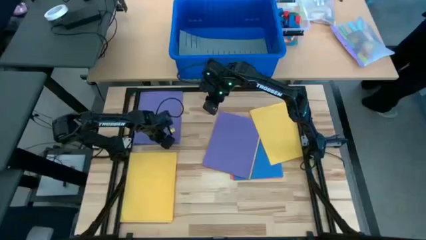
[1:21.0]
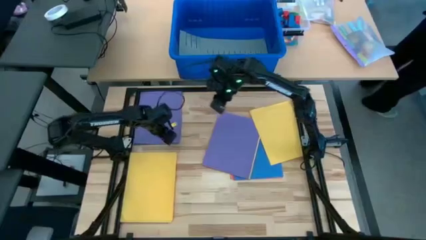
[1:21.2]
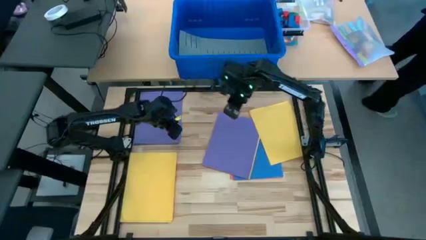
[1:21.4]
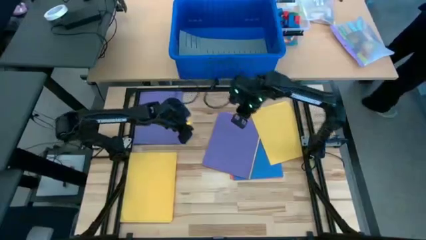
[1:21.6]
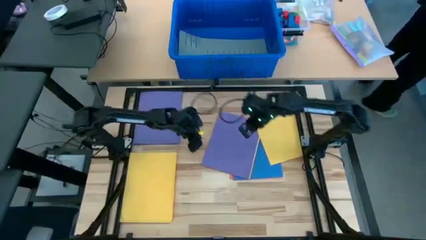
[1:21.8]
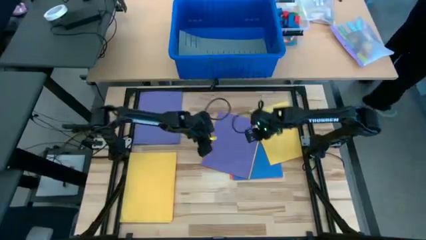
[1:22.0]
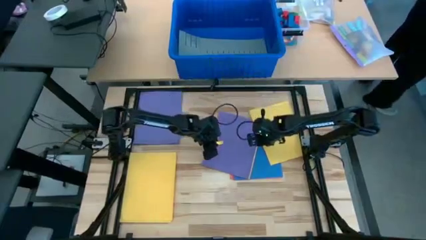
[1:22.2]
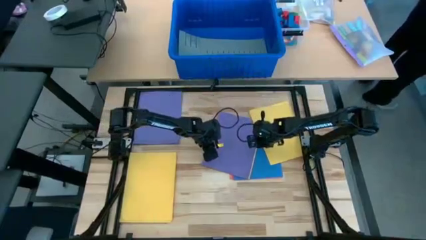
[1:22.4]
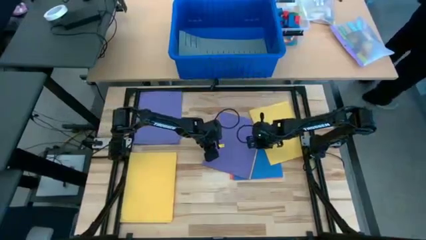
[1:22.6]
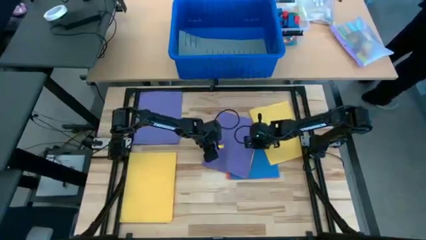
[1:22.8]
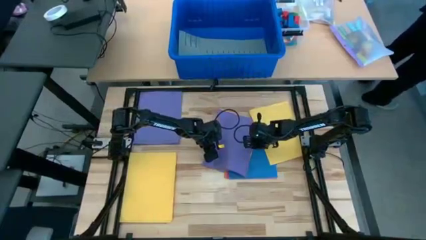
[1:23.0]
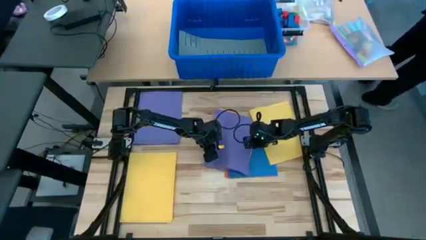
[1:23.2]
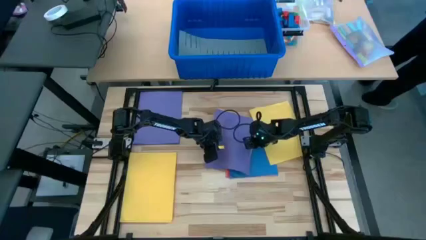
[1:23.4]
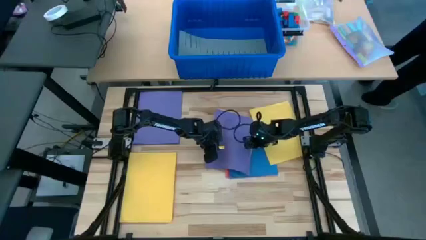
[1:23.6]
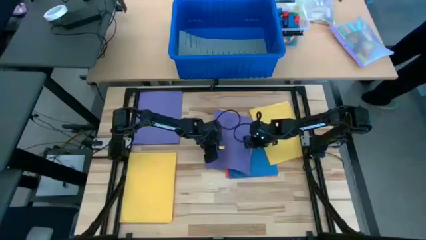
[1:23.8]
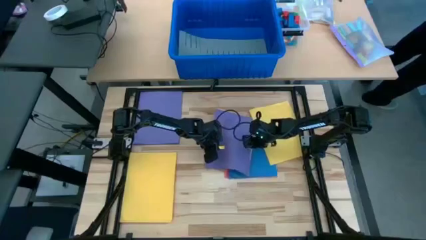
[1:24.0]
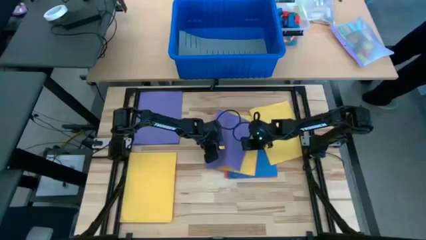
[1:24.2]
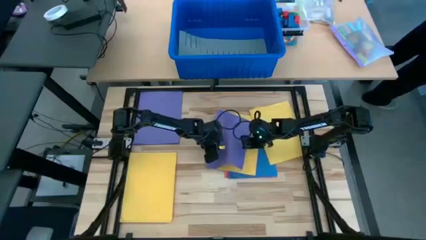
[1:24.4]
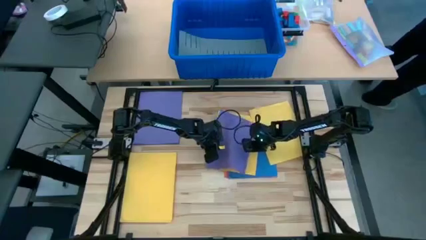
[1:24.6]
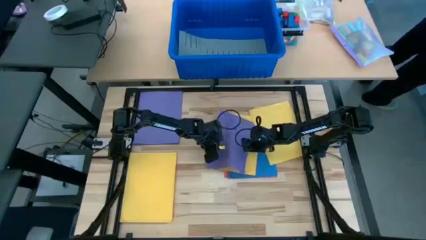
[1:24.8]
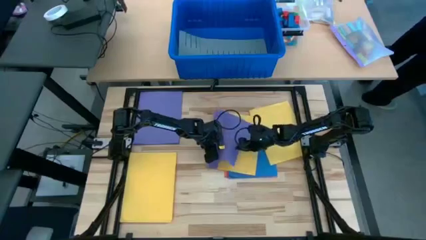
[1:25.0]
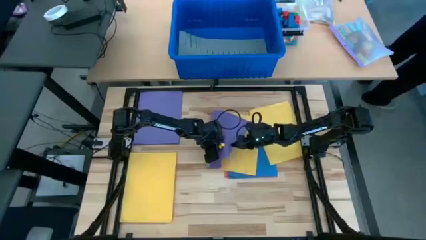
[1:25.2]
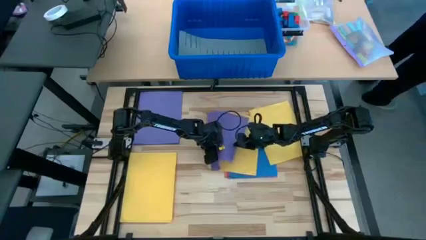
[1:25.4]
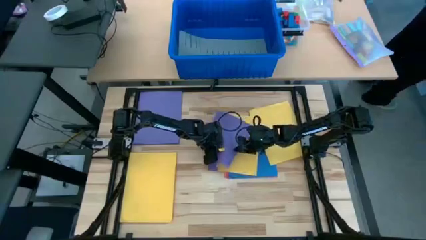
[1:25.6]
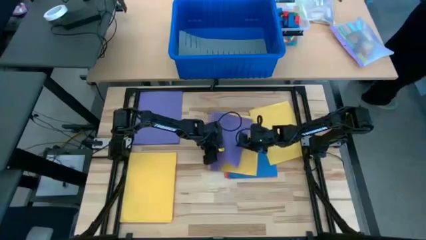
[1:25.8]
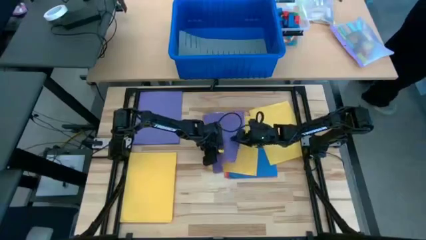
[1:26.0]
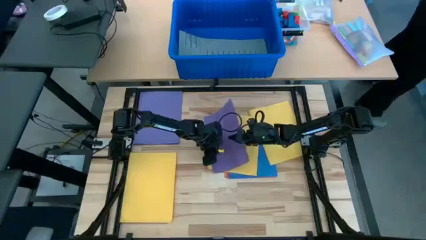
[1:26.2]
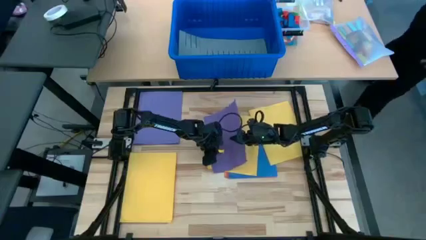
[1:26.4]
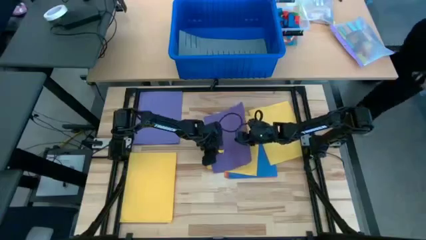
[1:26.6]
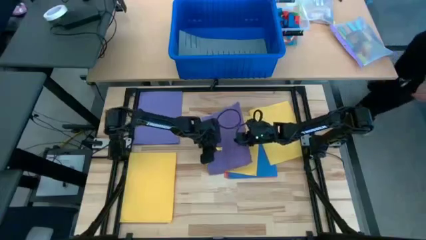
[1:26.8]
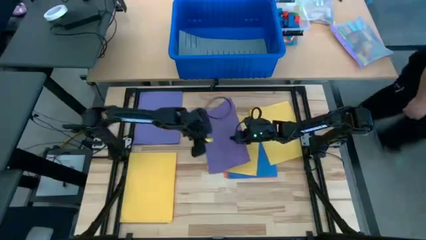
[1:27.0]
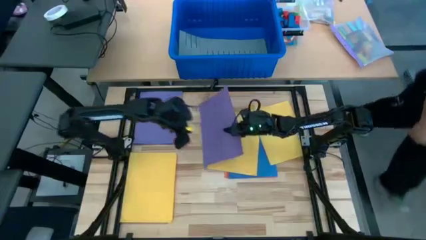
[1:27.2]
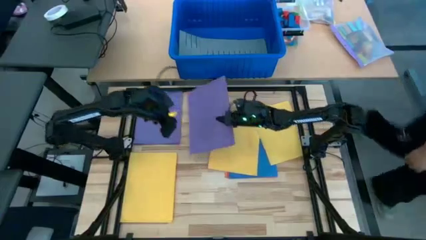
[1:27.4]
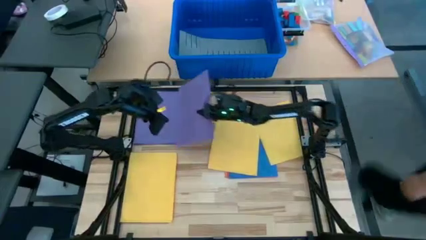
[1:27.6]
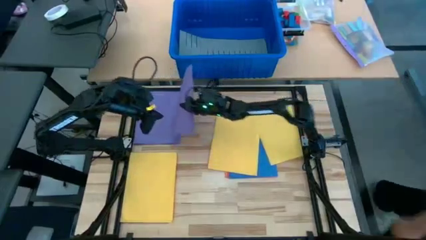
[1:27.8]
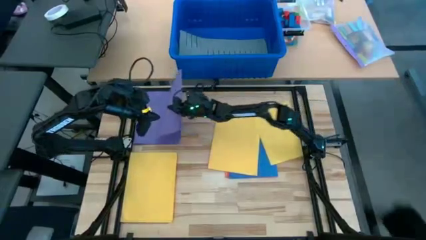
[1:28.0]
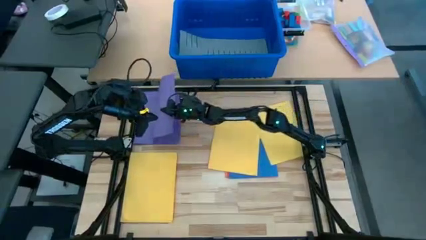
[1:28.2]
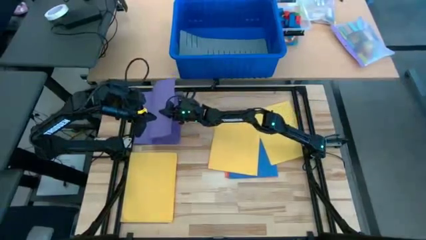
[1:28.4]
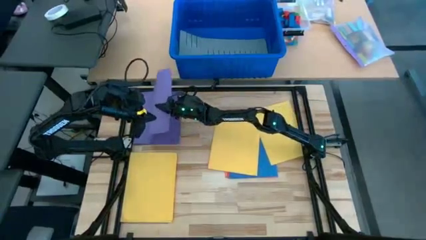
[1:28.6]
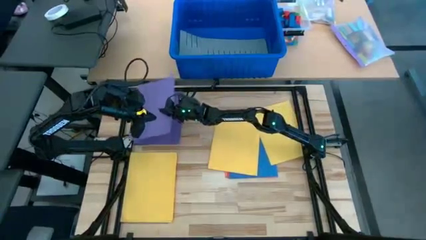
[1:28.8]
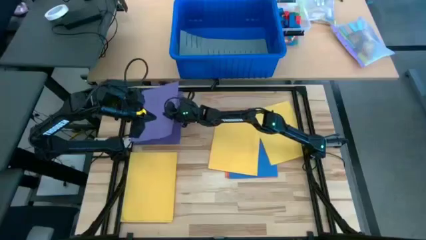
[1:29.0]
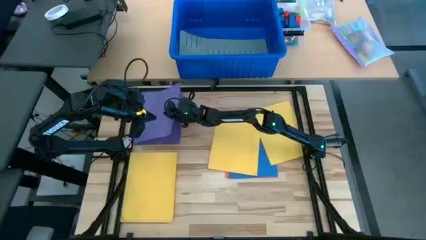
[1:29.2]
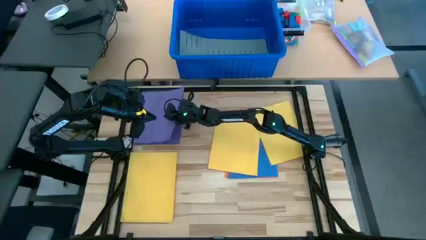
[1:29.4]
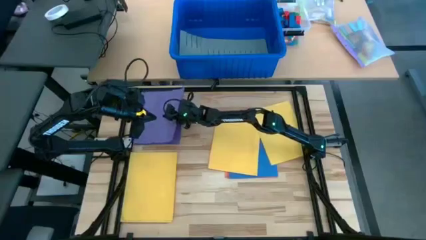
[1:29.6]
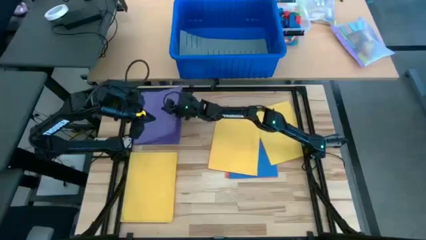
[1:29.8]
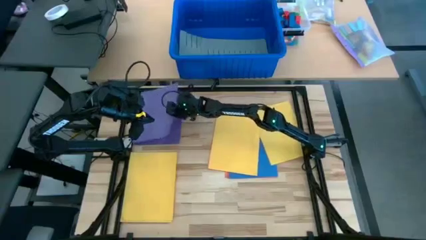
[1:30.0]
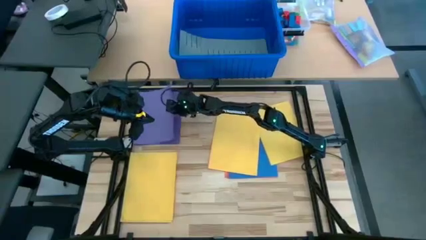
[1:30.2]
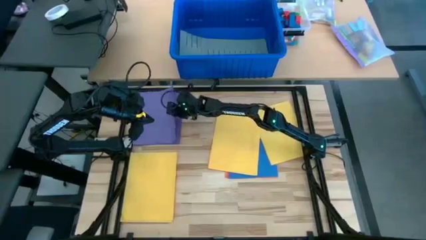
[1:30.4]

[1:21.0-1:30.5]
Task: Organize paper
Stack the purple colored paper on top of the other purple colored papers

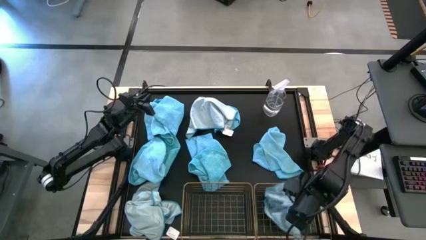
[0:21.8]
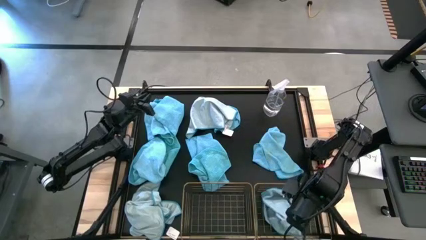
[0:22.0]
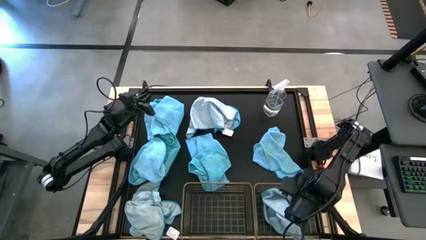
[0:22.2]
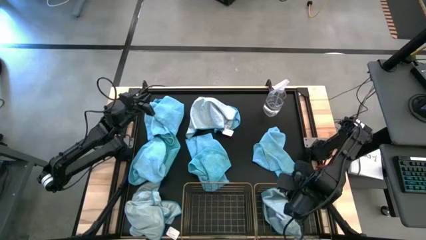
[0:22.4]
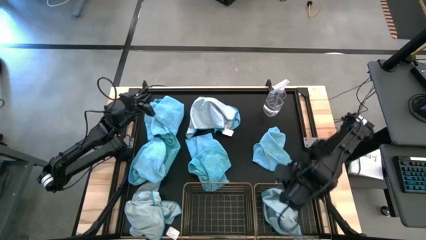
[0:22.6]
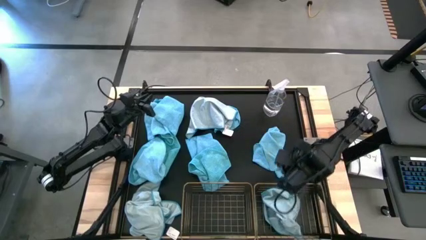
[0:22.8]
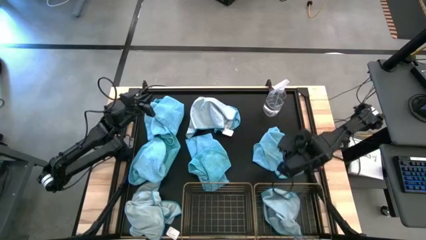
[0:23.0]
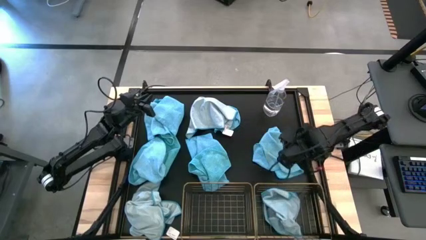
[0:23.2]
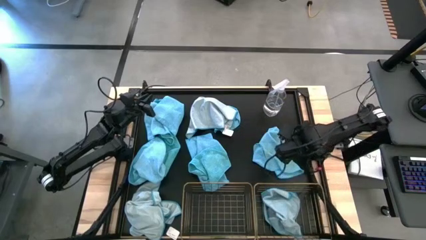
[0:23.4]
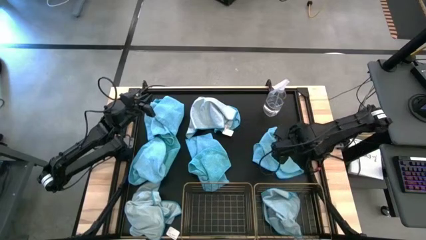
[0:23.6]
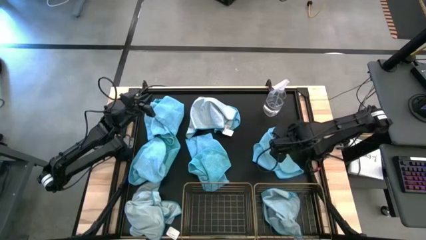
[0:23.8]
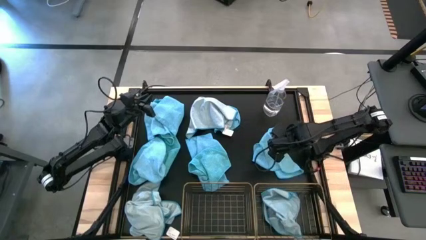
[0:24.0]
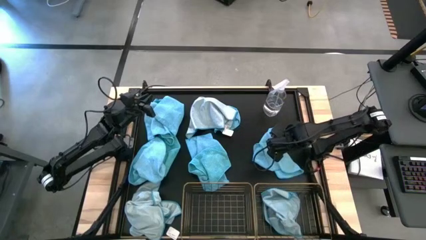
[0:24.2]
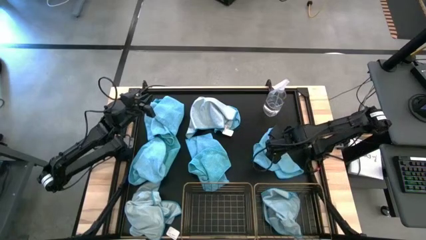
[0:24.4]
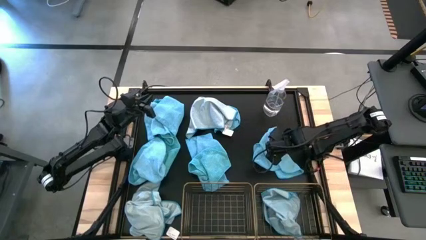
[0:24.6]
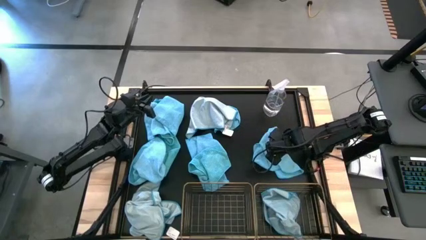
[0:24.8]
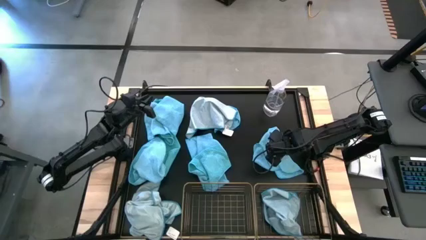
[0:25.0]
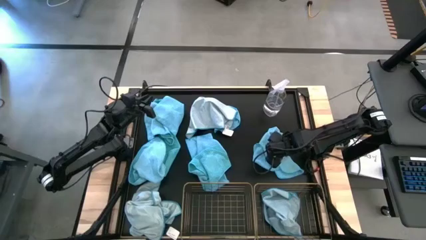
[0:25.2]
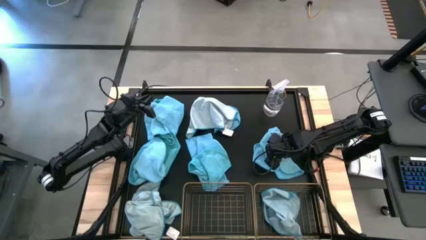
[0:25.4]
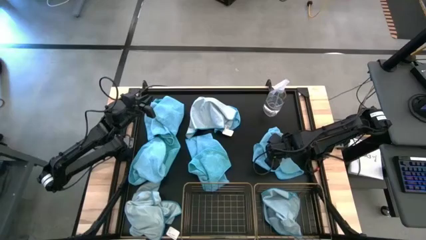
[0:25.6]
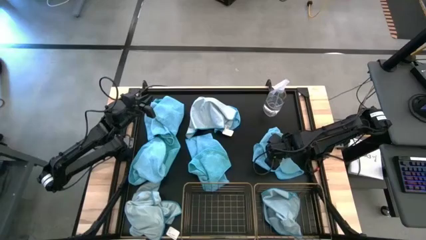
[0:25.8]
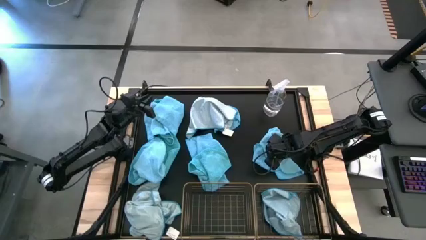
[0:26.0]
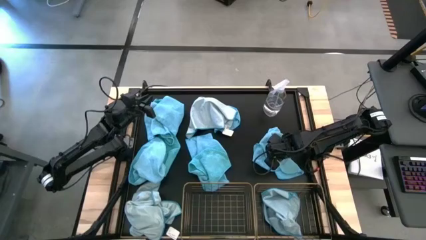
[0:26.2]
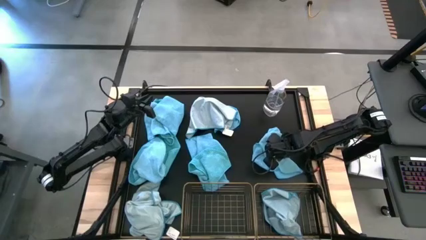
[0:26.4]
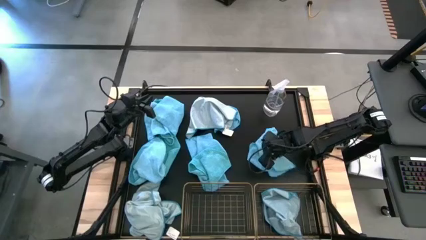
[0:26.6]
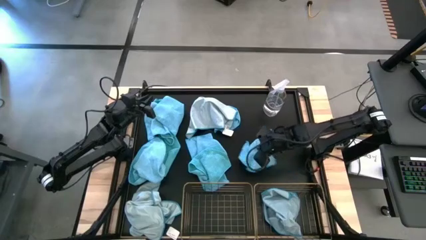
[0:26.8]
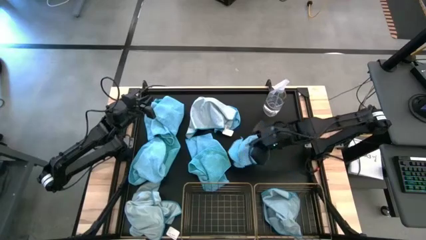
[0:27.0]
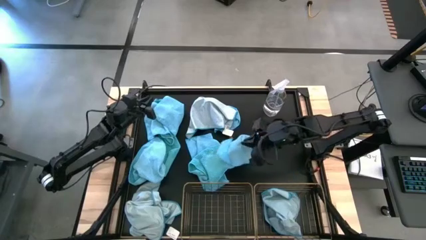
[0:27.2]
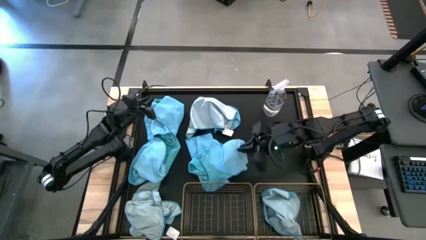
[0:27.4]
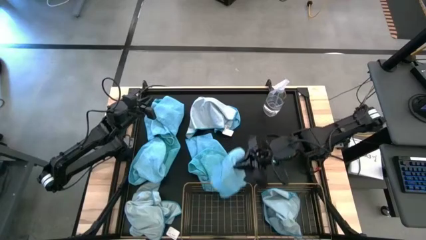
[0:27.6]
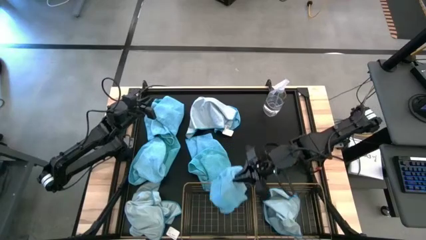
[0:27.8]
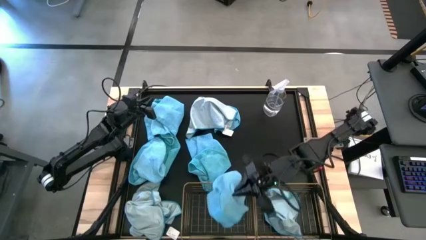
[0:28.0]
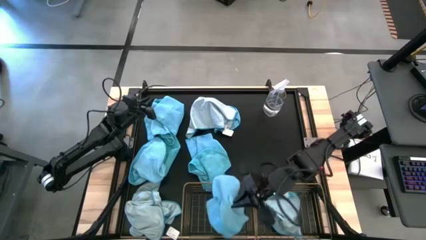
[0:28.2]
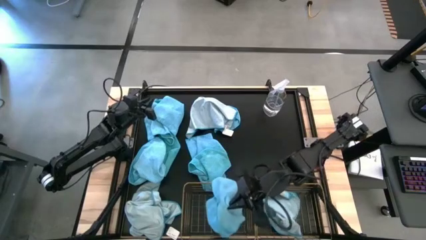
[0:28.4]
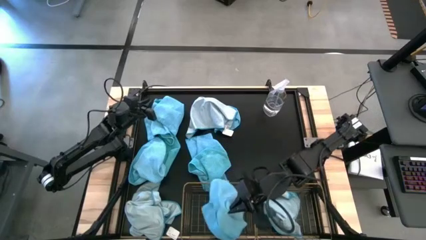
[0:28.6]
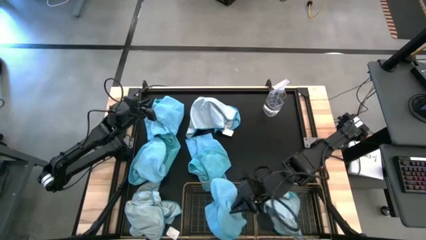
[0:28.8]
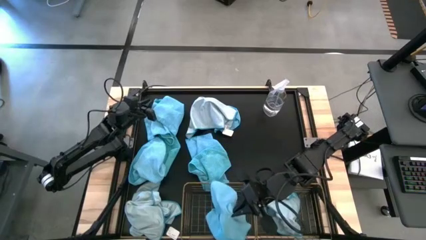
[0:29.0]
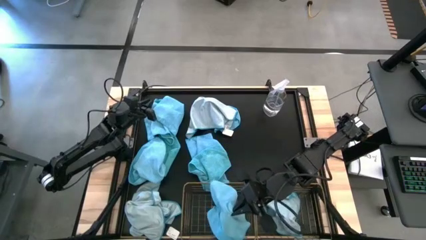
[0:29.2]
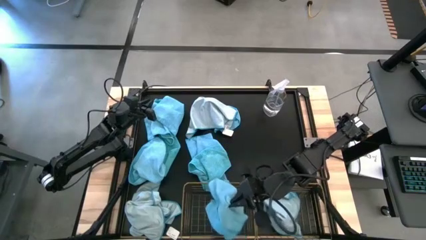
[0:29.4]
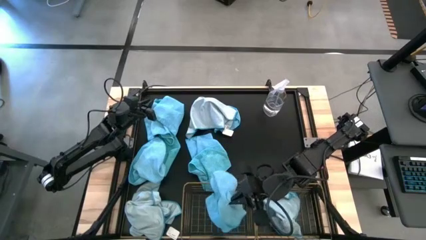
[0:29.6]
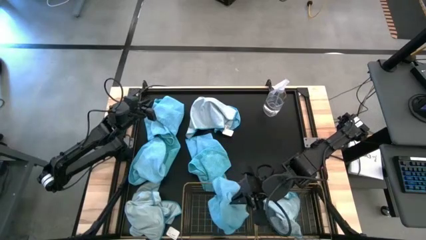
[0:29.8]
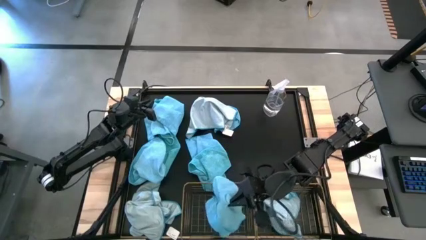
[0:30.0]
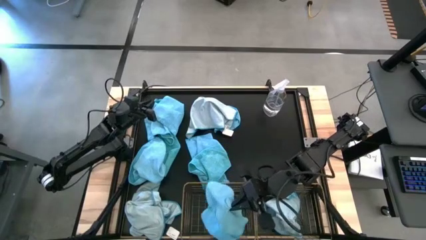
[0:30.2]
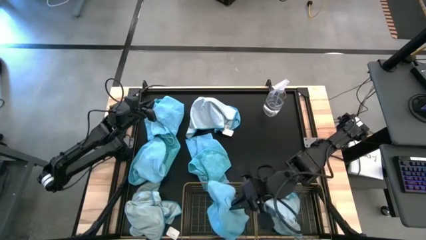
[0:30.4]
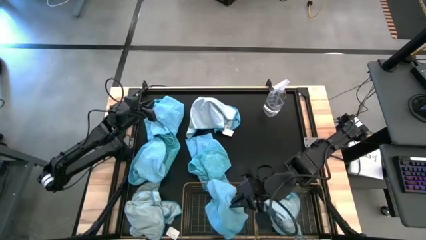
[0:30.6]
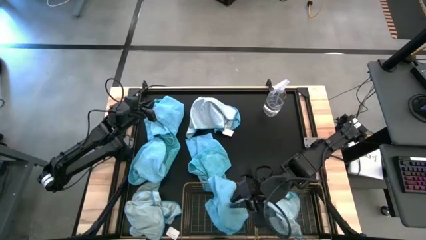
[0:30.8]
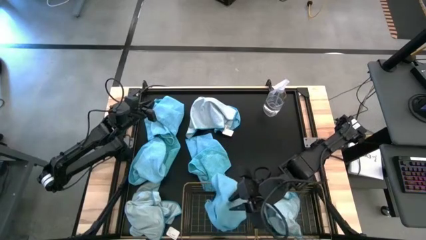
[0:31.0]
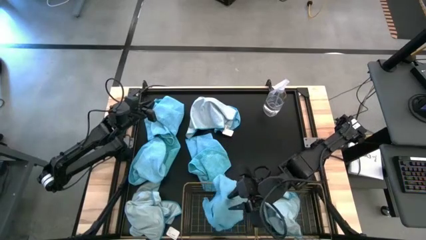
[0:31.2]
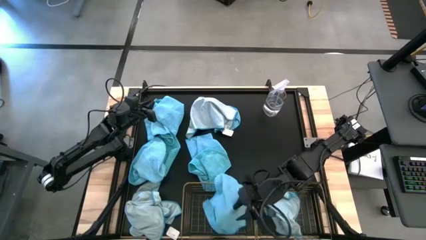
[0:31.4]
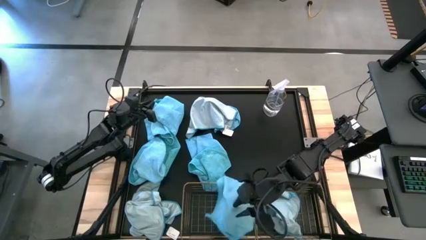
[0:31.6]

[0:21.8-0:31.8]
Task: Sort microfiber towel by color & place in baskets
Put the blue towel into the left wire basket
